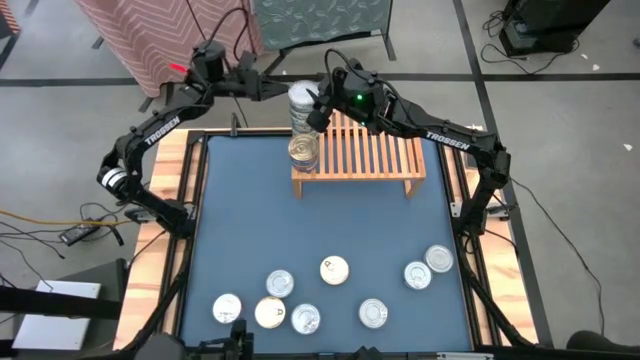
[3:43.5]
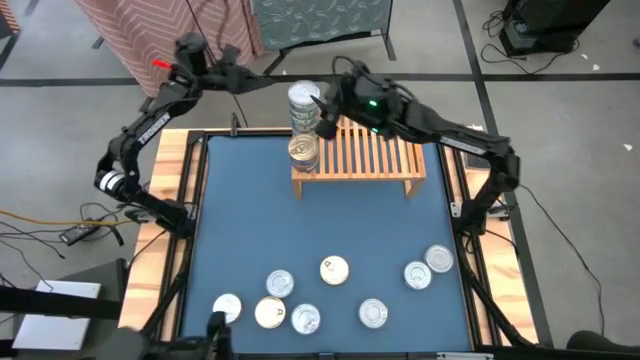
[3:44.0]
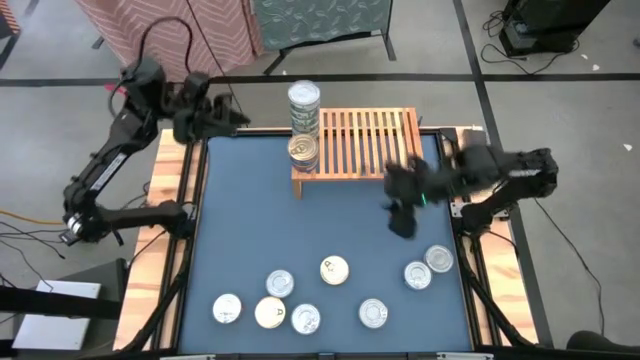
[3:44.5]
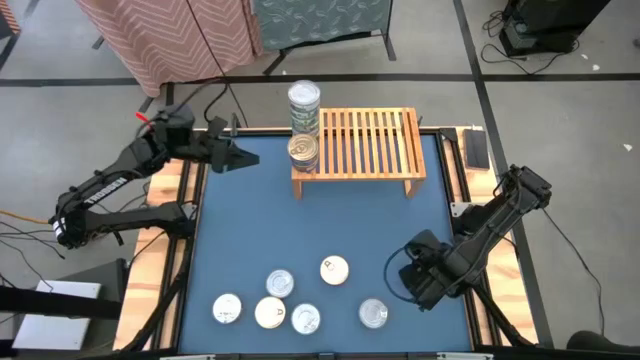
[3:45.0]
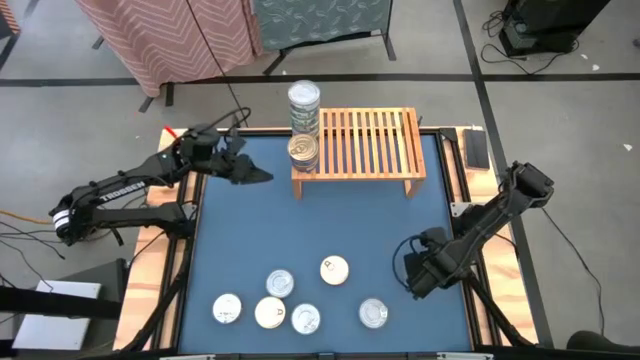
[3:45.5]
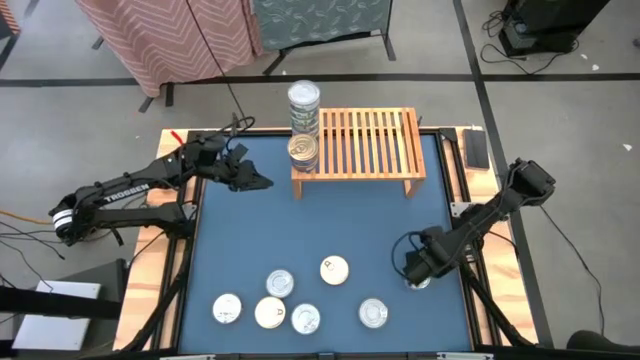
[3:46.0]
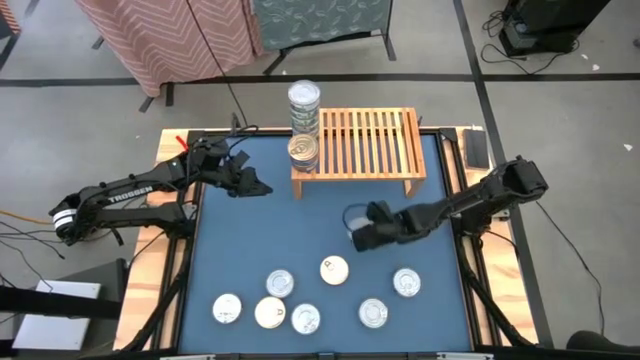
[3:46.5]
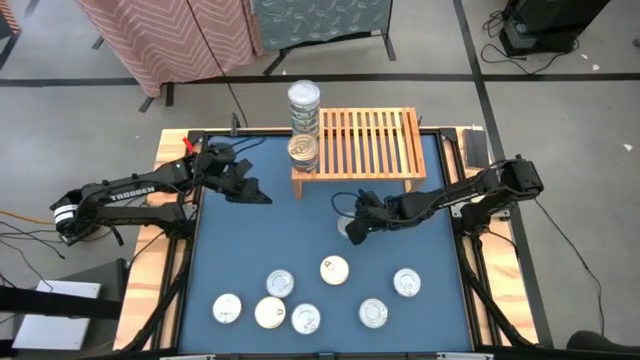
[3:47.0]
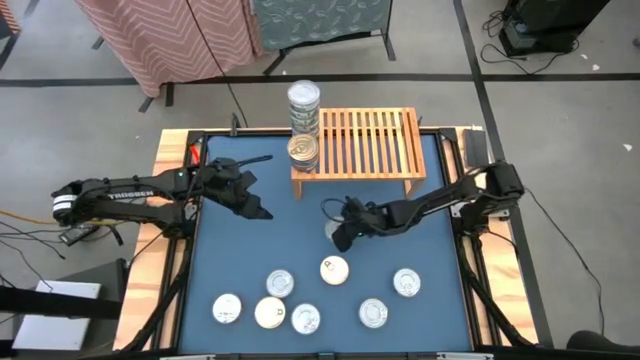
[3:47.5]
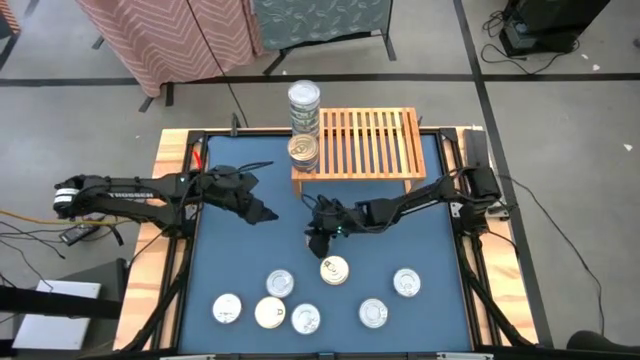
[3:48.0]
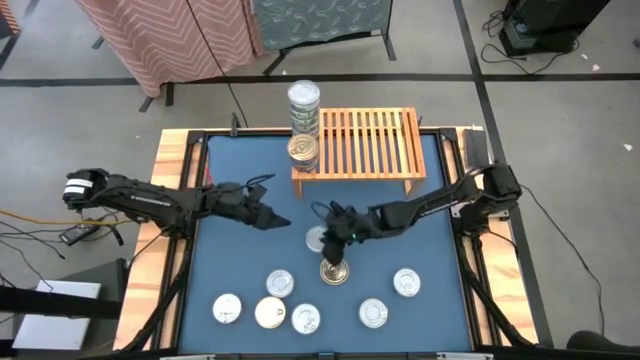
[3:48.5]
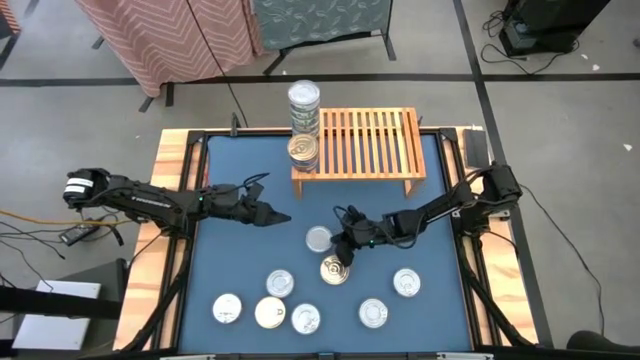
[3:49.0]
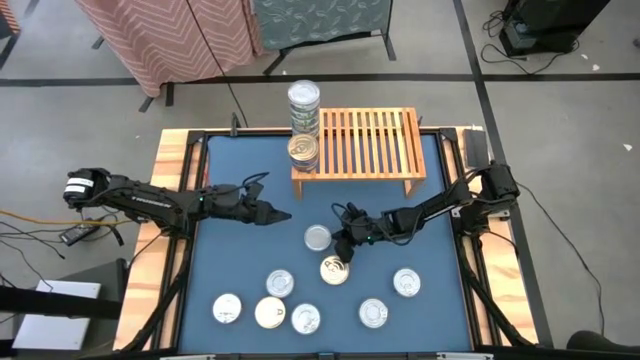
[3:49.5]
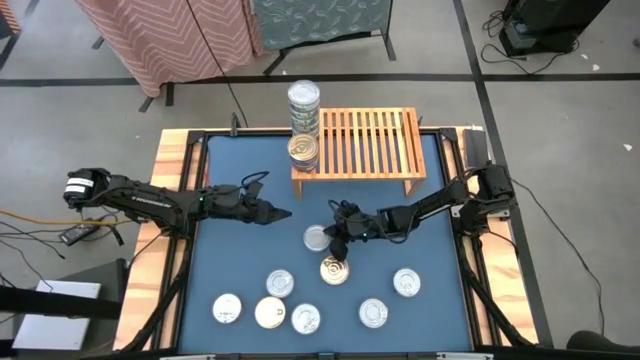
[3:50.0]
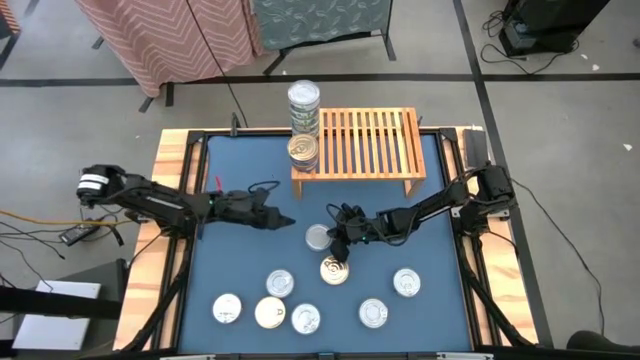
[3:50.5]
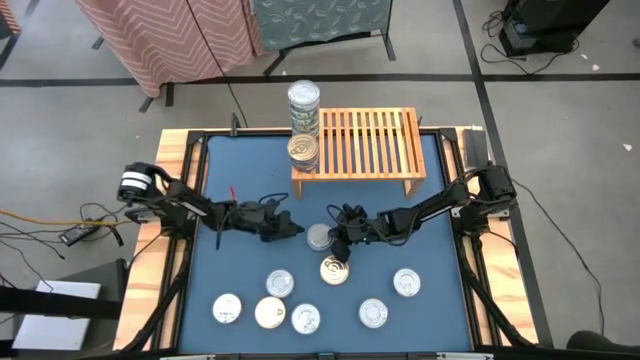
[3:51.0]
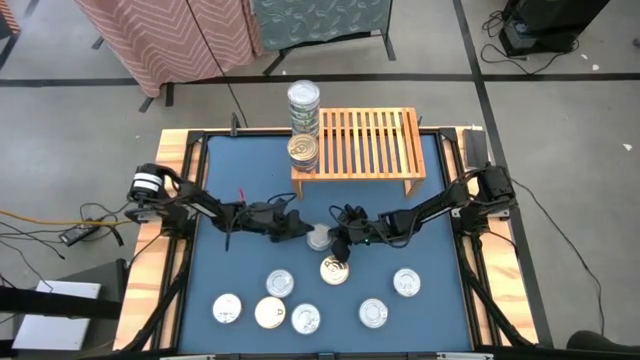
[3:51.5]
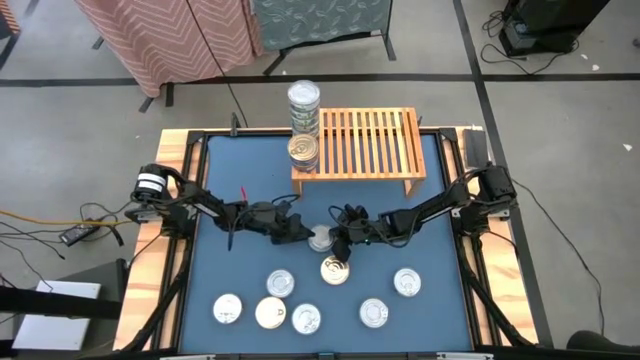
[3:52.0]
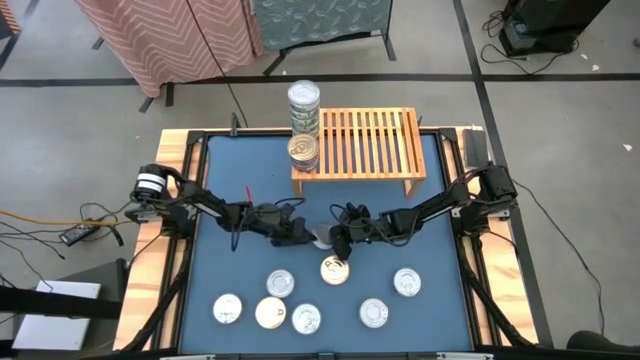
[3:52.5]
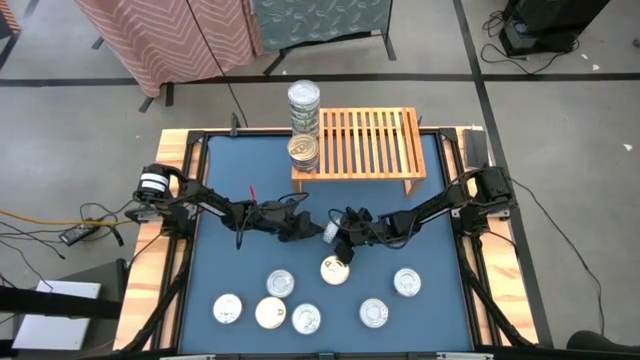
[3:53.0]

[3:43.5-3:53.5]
Task: Stack canned seafood by type on shelf
Stack the green tuna can on top of the other green tuna cans on the shelf

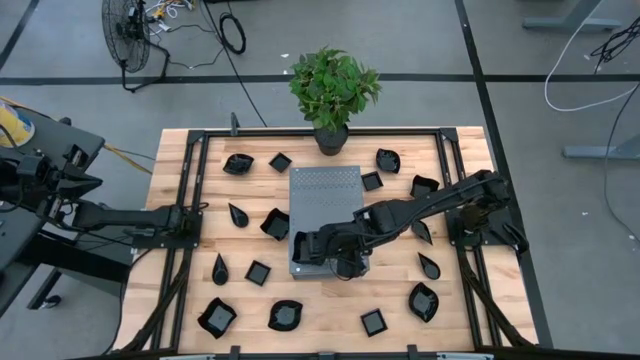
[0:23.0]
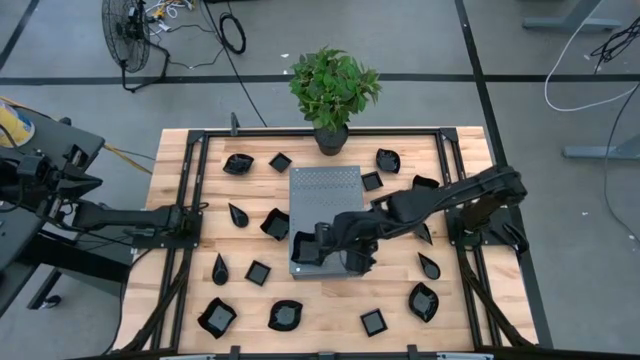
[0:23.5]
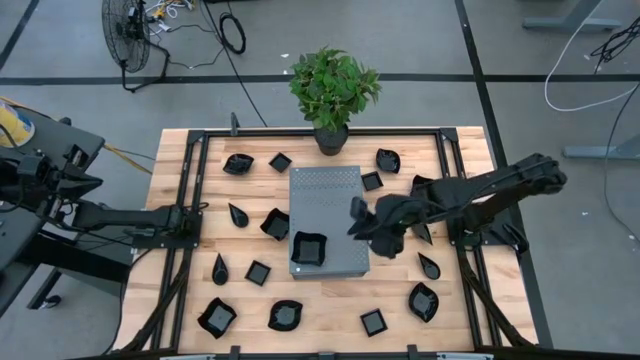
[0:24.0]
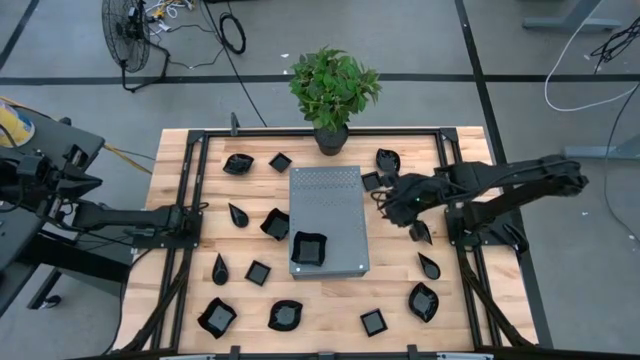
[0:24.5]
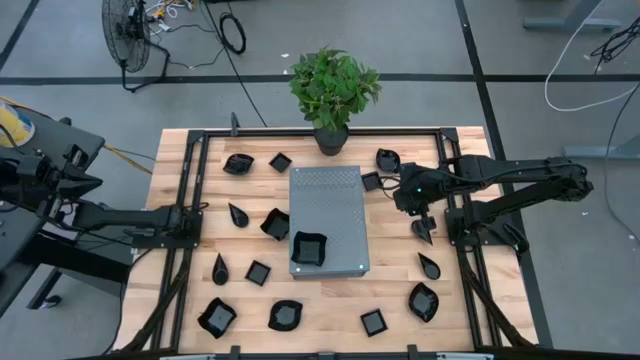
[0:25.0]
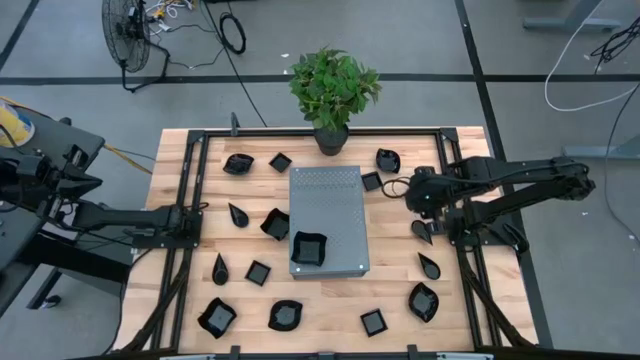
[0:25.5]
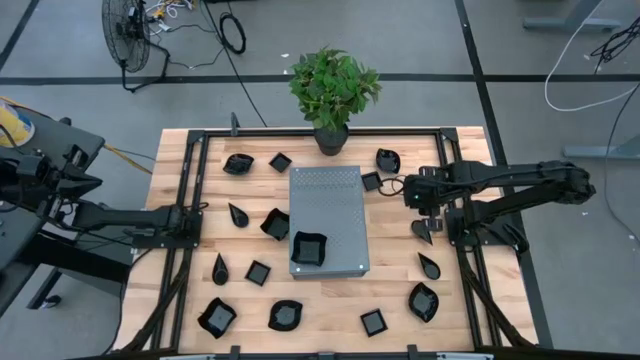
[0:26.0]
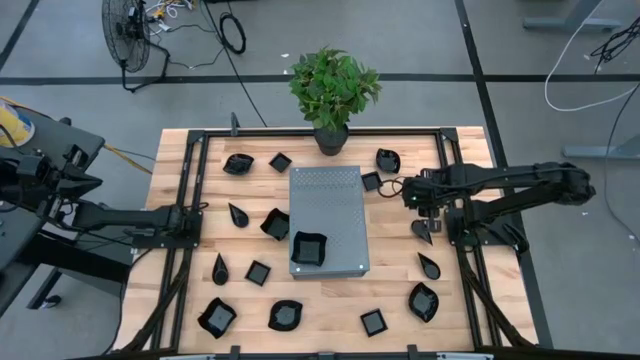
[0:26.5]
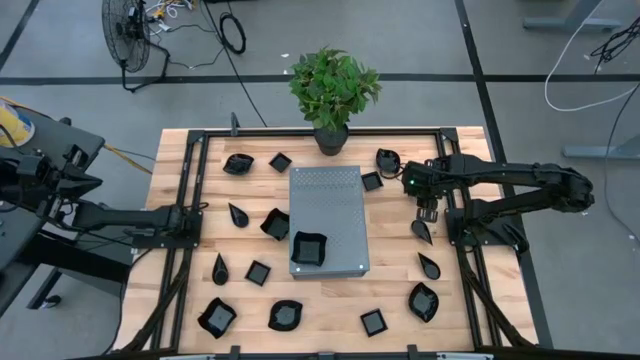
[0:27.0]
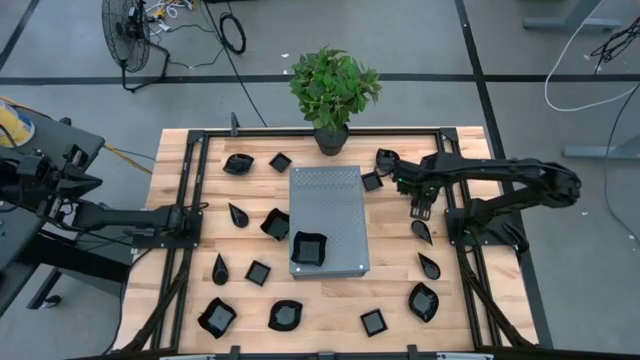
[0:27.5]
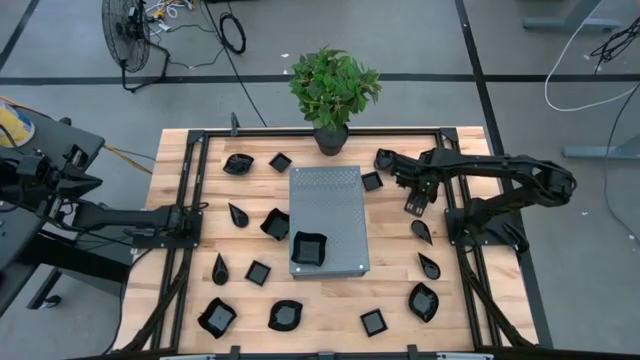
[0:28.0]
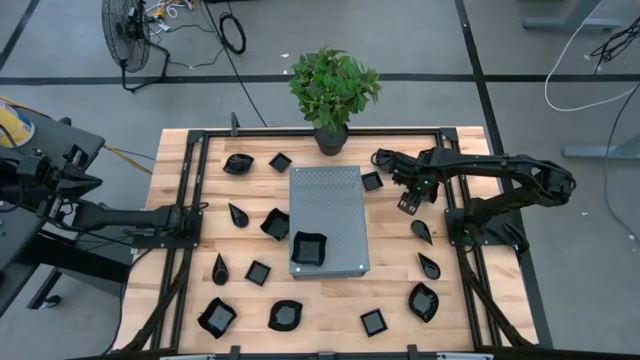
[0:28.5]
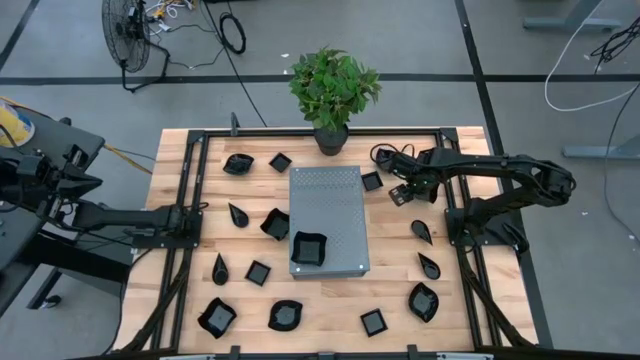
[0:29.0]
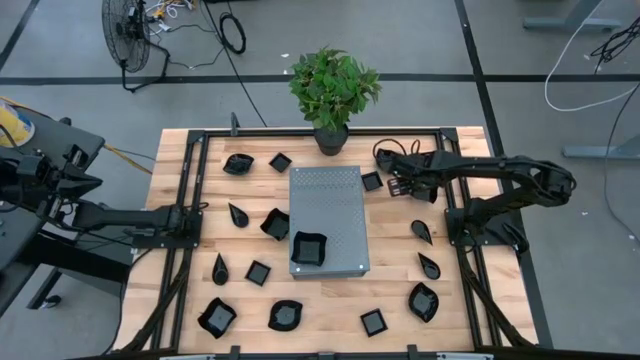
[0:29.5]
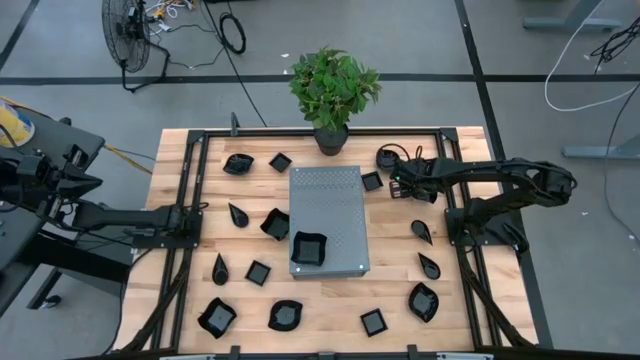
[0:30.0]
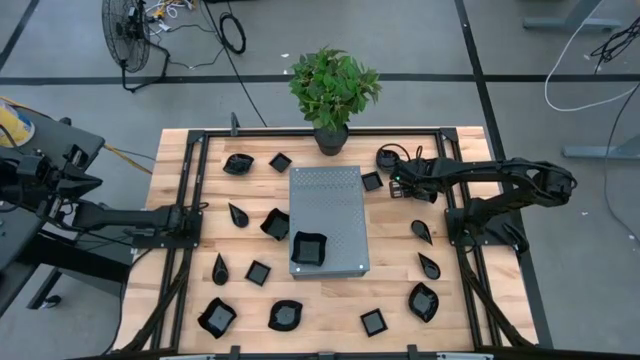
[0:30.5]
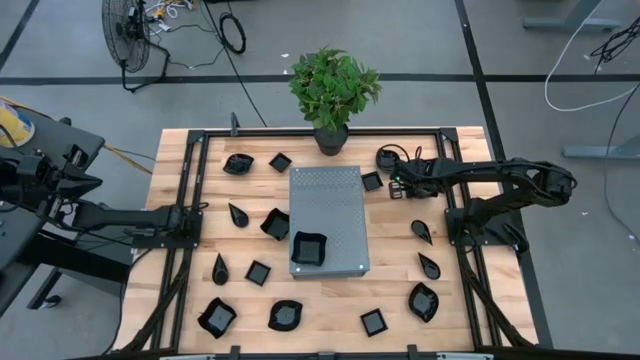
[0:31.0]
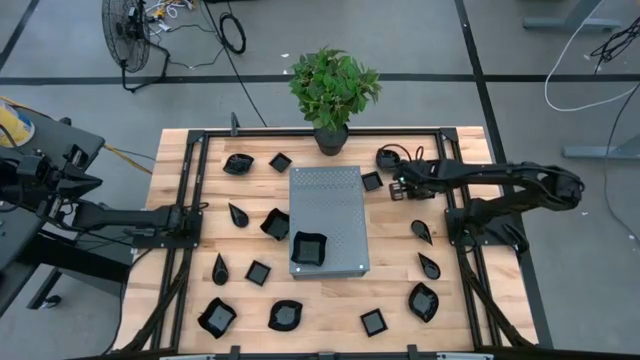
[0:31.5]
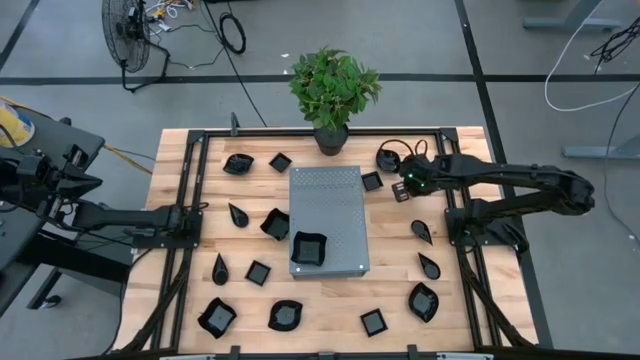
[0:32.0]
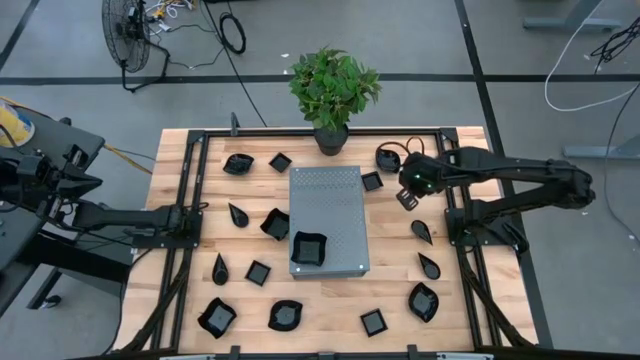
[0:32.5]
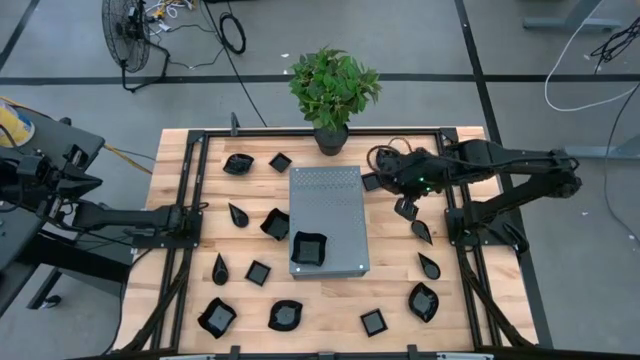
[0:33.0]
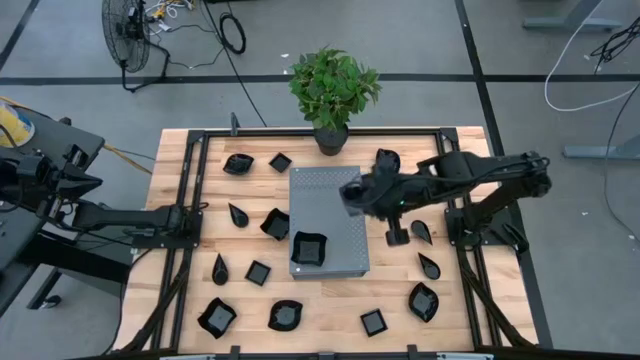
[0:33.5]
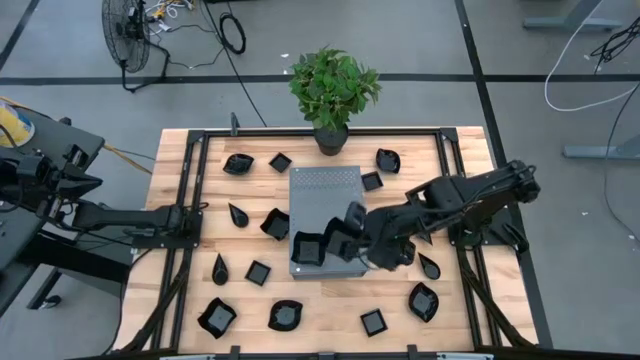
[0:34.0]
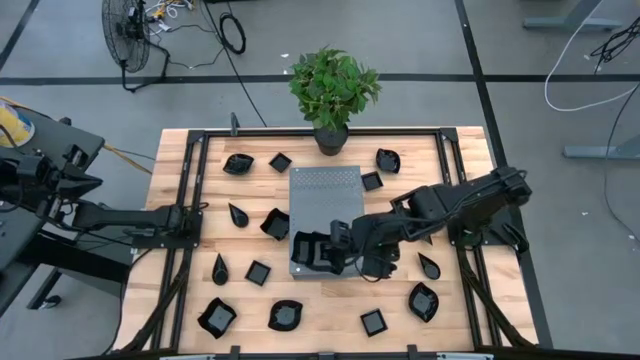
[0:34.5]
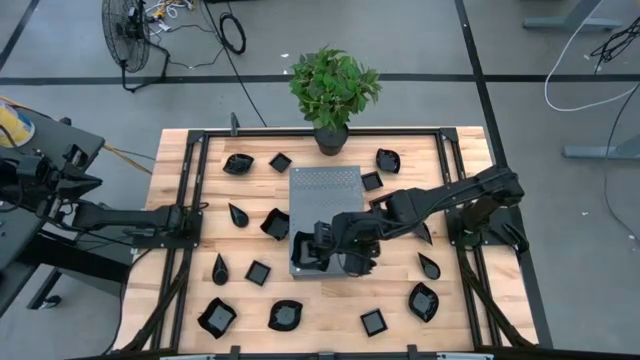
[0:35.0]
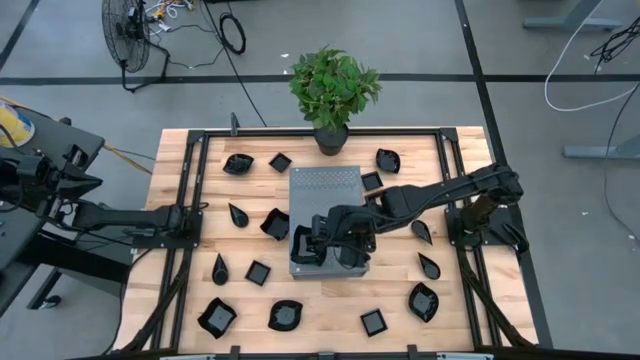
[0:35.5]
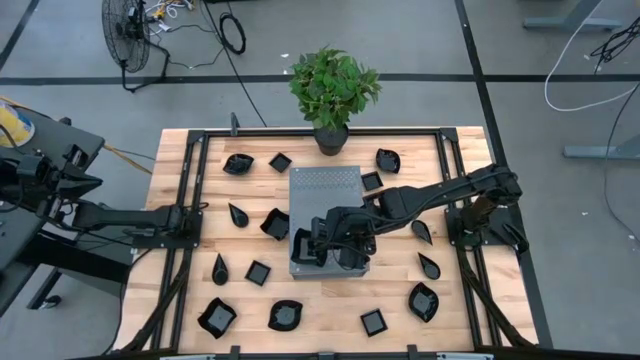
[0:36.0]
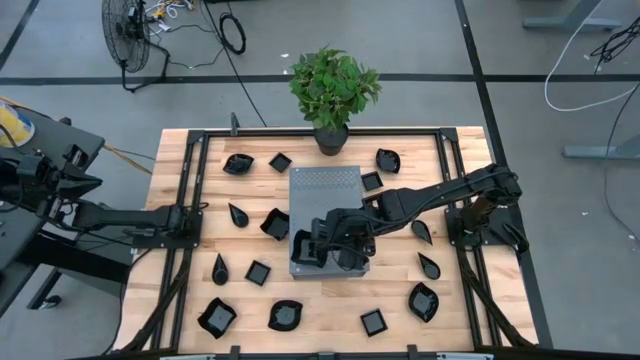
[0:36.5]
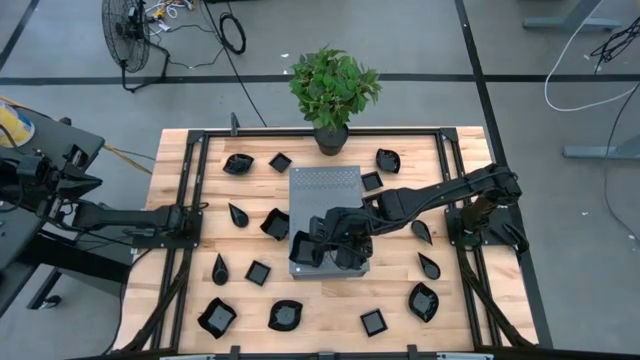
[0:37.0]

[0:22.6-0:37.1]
Task: Pick & Place Mini shaped plates
Stack the black bowl on top of the black bowl on the shelf
